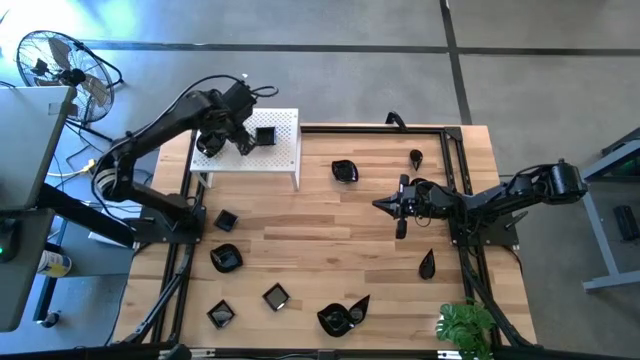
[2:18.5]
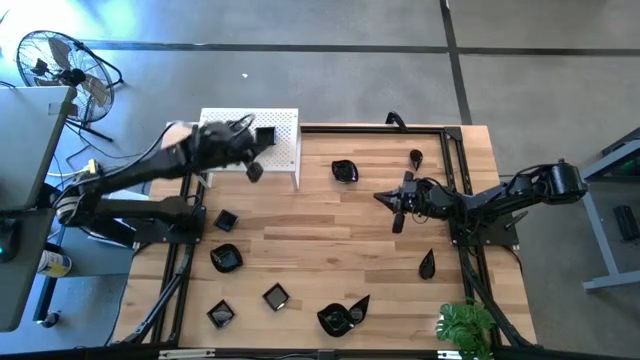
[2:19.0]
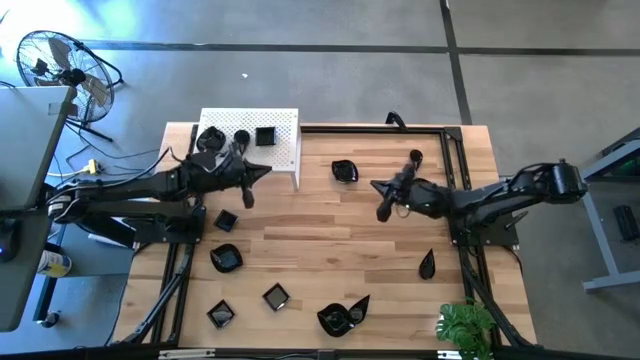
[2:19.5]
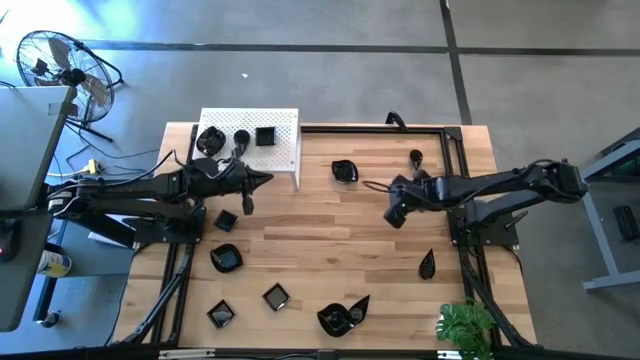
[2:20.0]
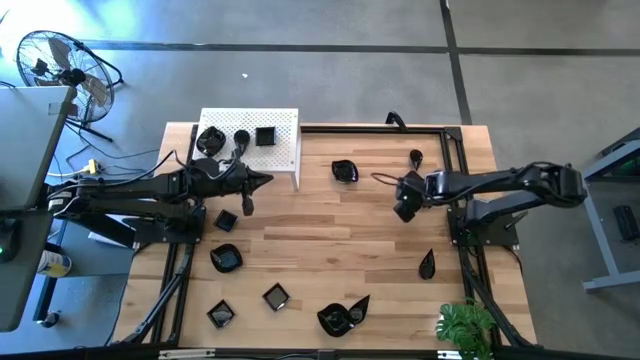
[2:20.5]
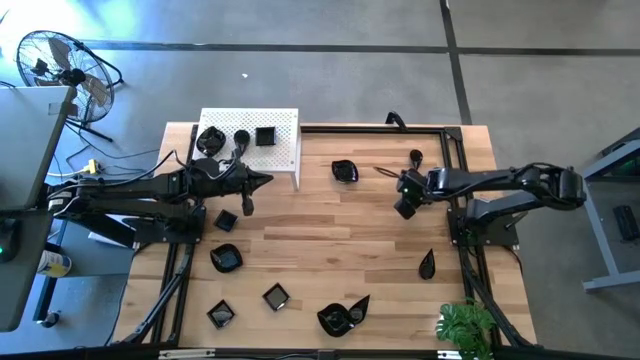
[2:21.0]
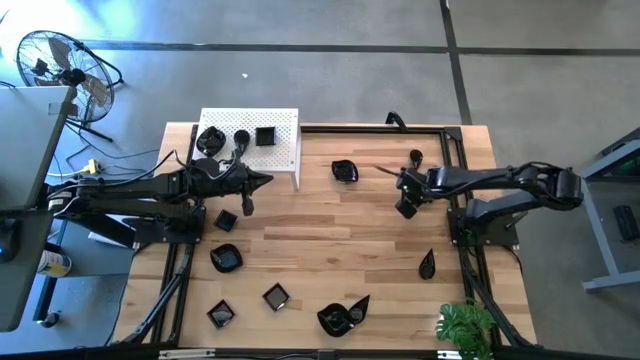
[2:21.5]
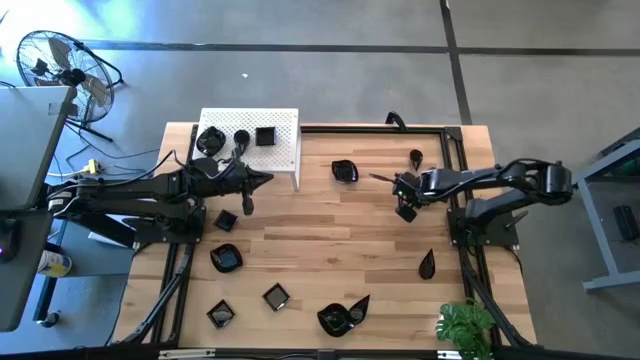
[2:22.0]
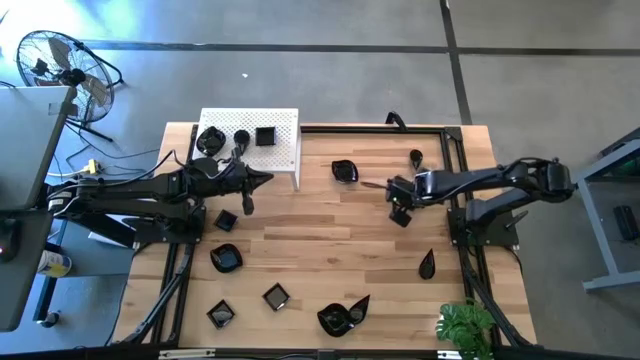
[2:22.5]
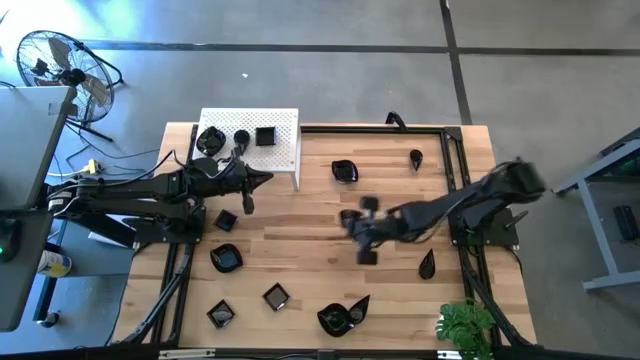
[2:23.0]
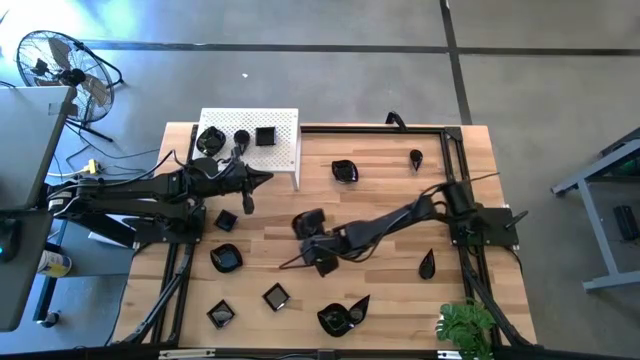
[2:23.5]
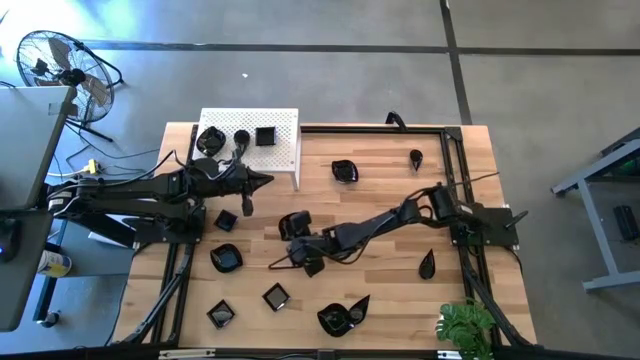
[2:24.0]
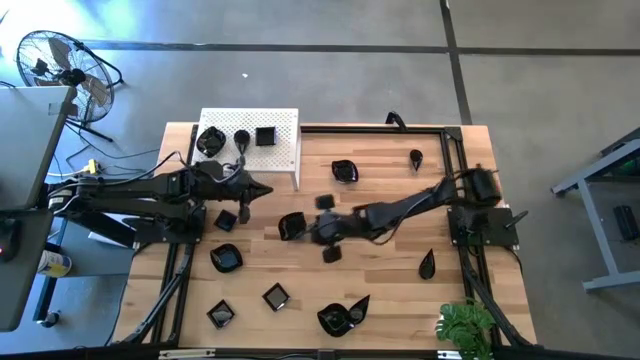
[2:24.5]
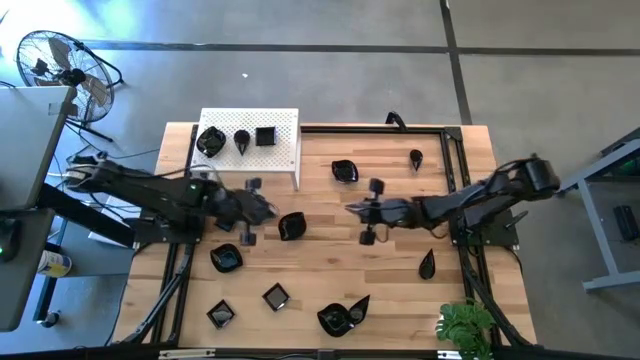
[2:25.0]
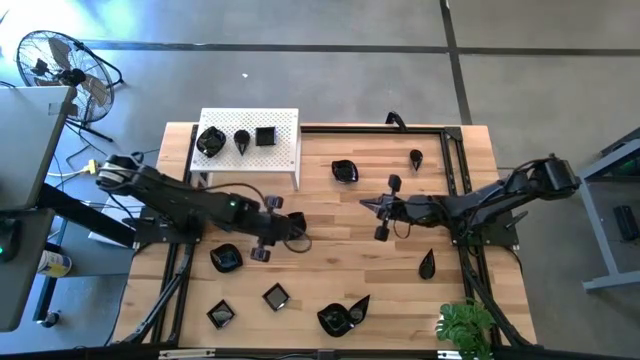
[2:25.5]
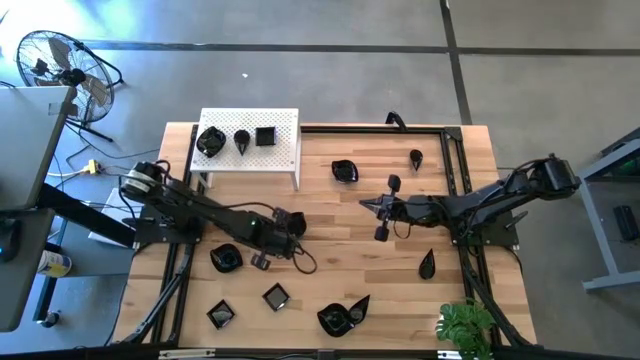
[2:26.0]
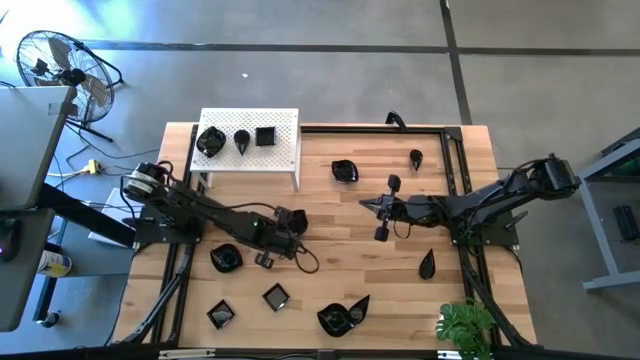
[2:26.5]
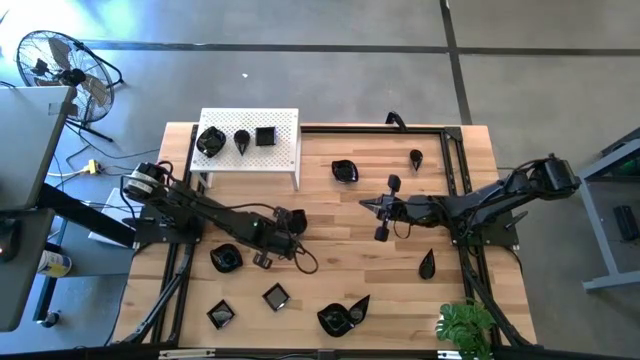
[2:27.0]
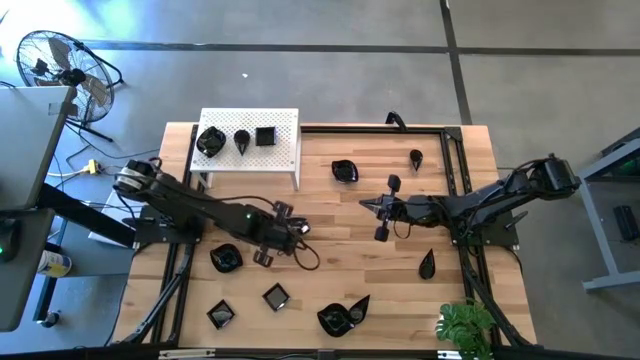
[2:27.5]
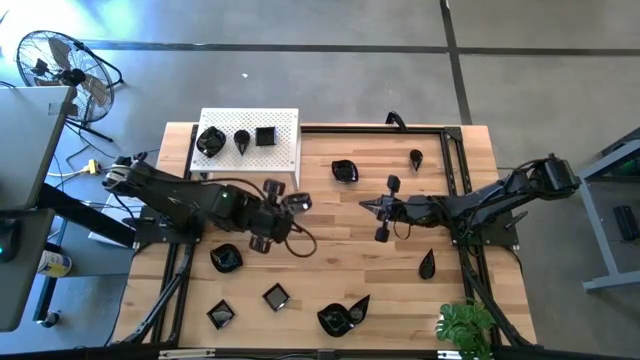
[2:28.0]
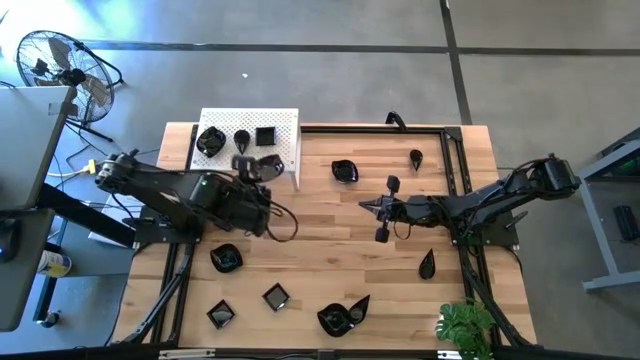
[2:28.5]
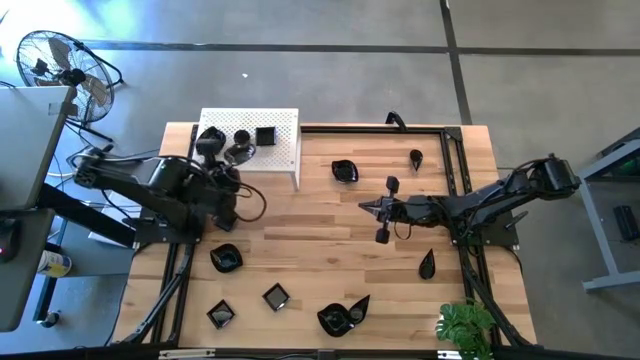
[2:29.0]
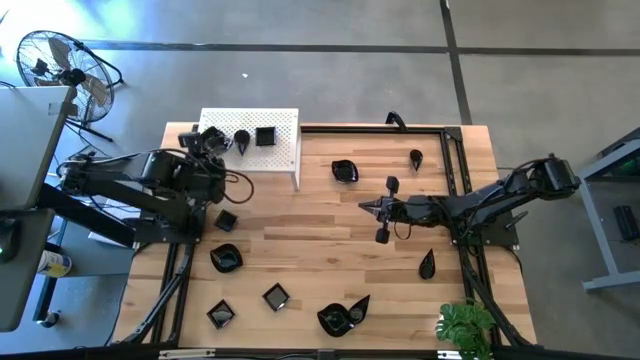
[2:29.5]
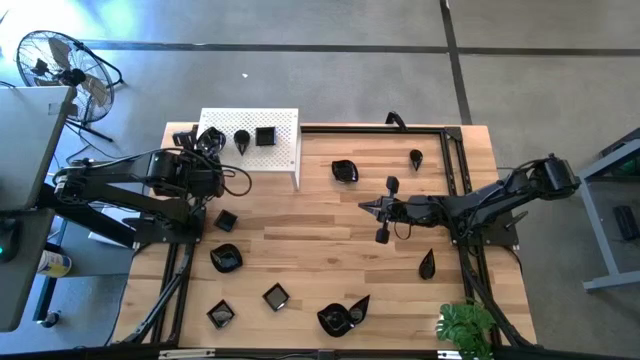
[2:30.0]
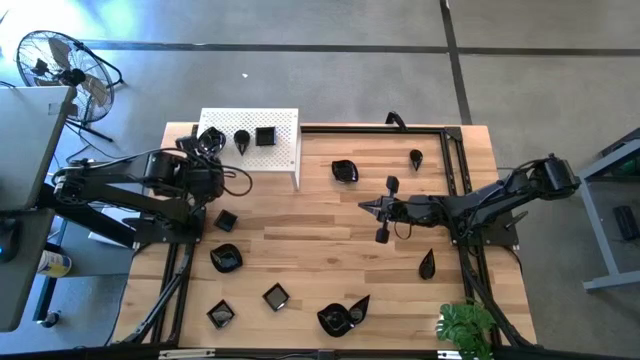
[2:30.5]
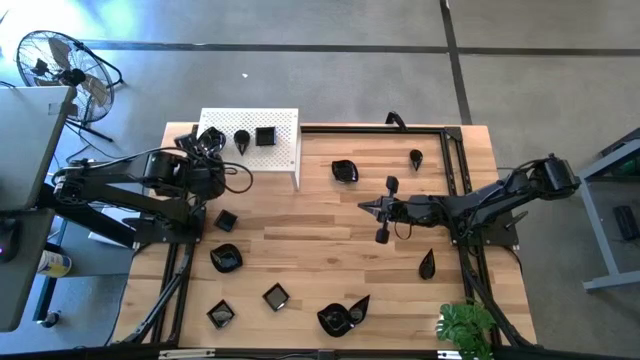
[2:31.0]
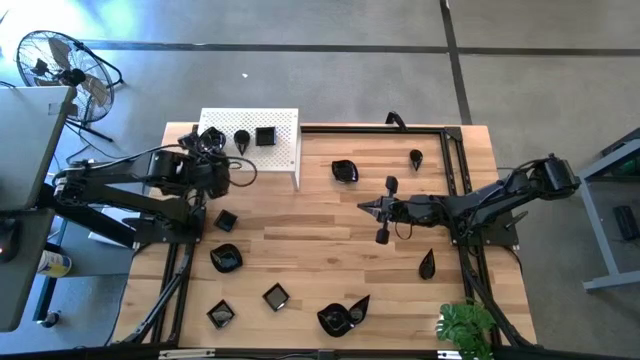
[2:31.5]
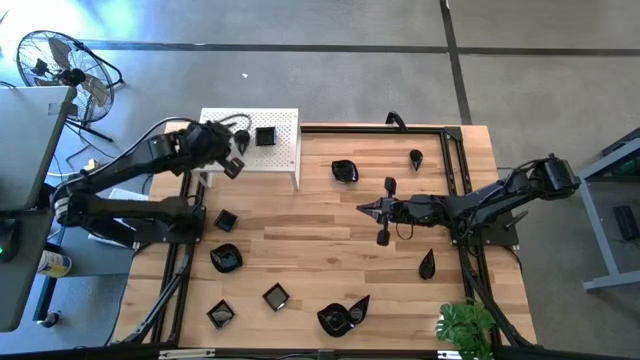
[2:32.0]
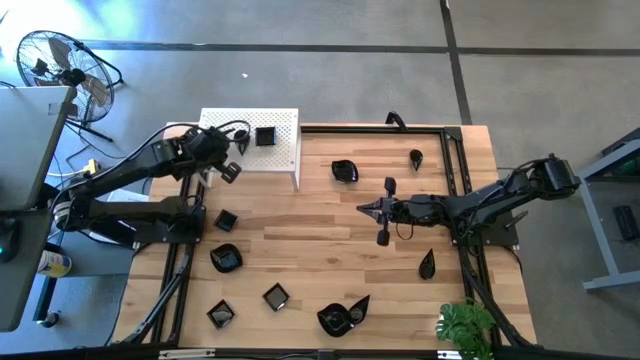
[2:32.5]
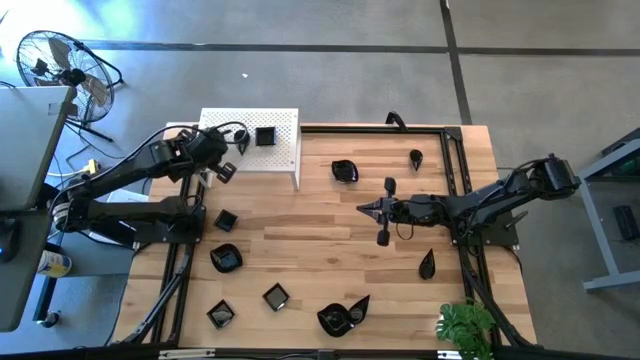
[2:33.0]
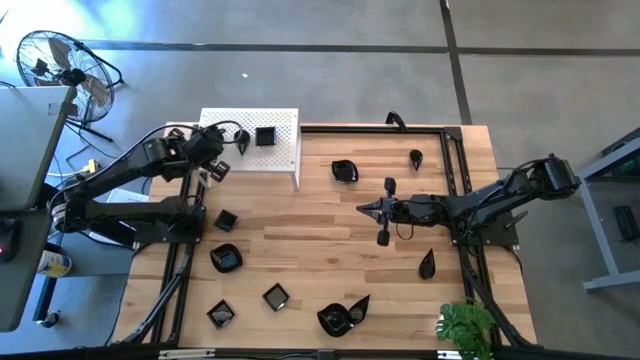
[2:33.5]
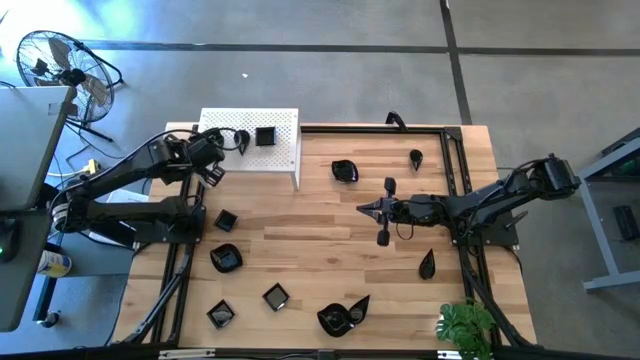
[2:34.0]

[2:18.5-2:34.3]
Task: Pick & Place Mini shaped plates
Stack the black leaf shaped plate on top of the stacked black leaf shaped plates on the shelf

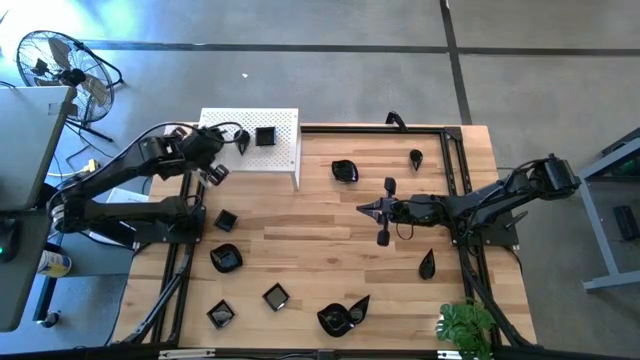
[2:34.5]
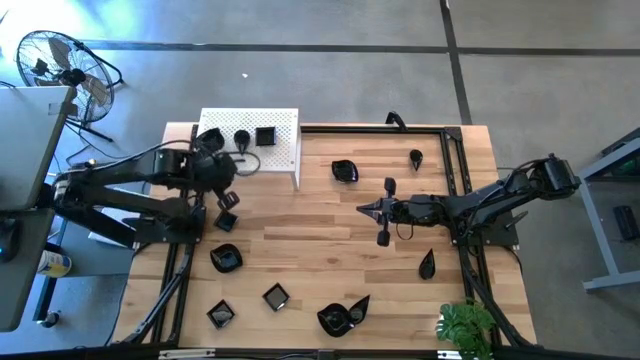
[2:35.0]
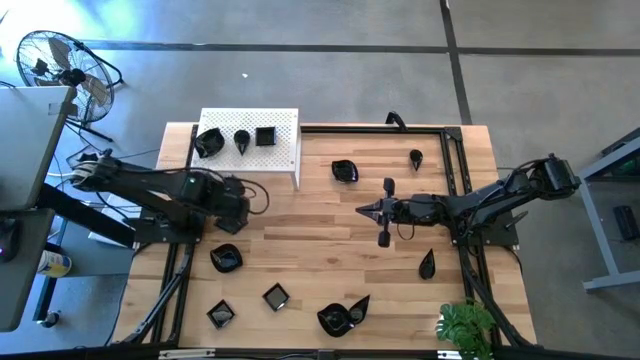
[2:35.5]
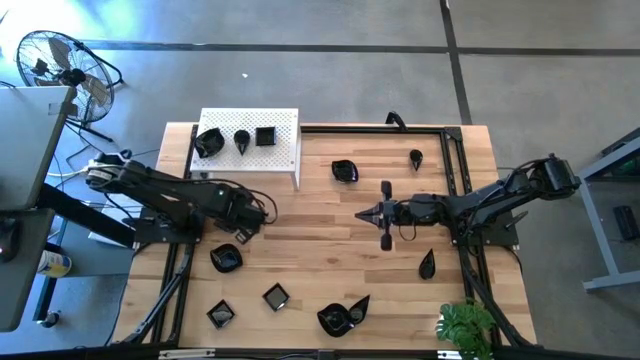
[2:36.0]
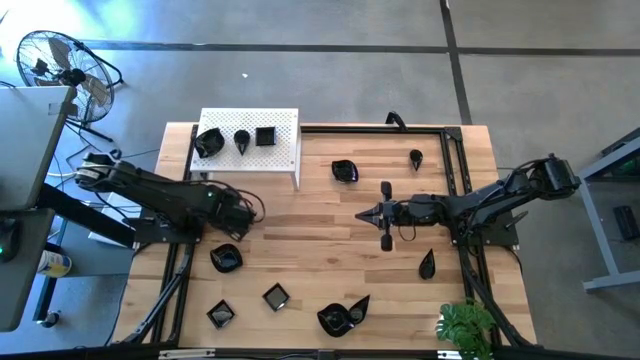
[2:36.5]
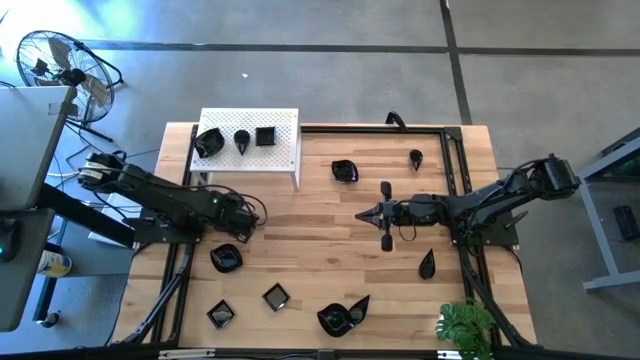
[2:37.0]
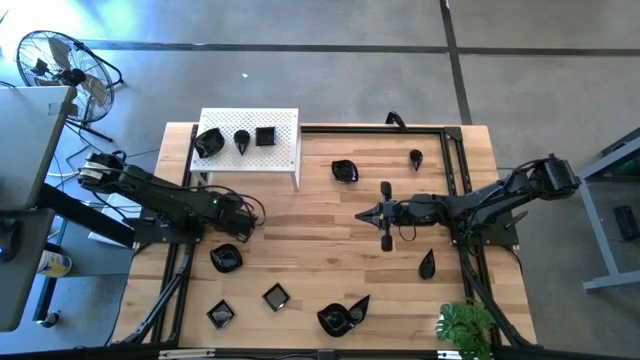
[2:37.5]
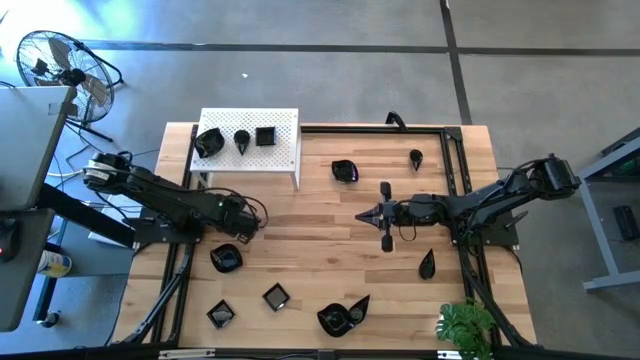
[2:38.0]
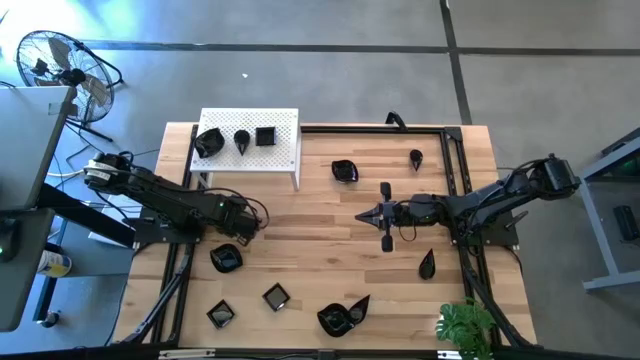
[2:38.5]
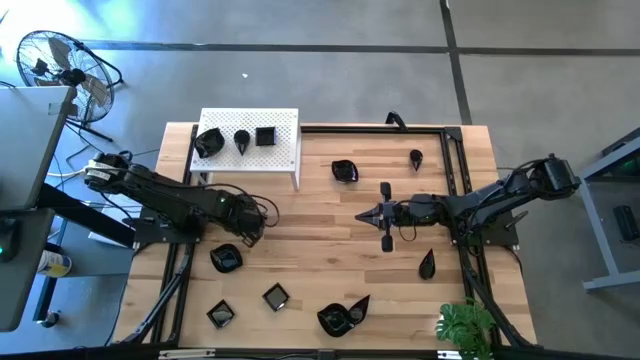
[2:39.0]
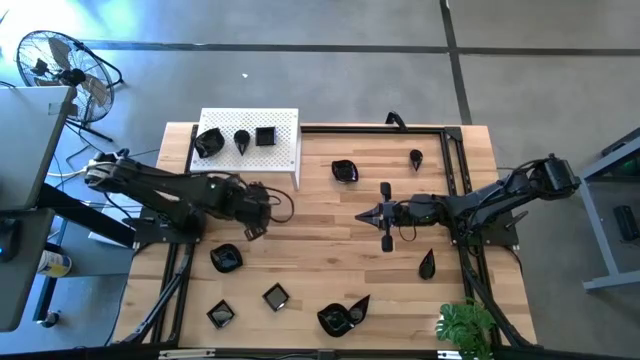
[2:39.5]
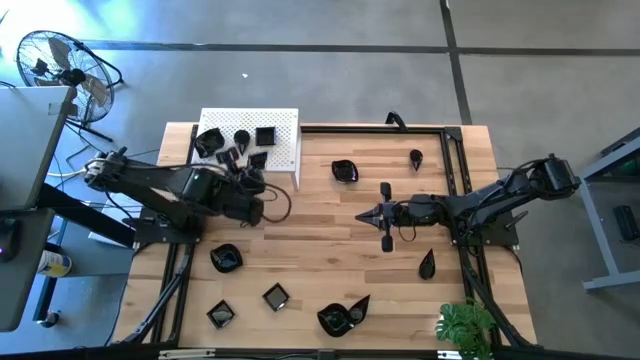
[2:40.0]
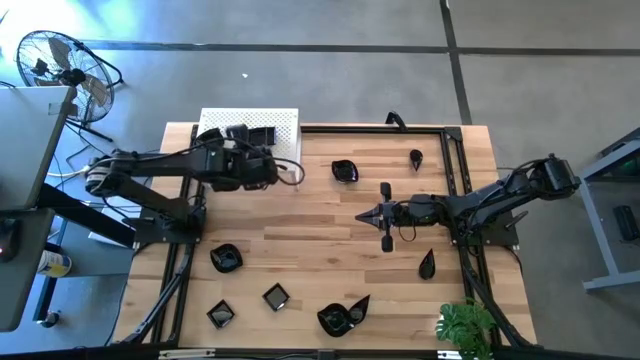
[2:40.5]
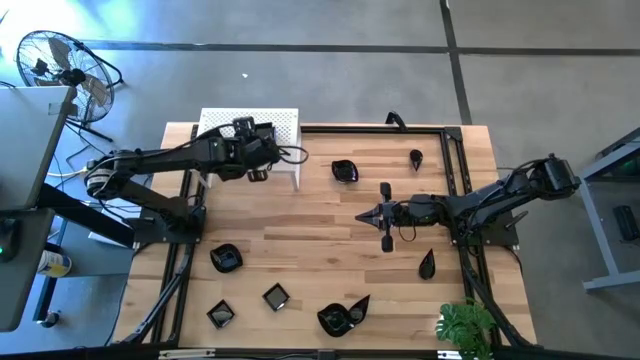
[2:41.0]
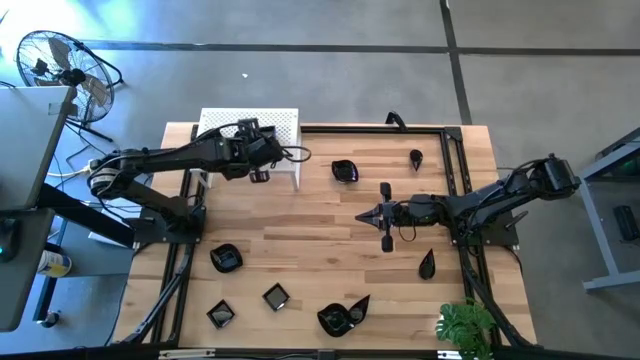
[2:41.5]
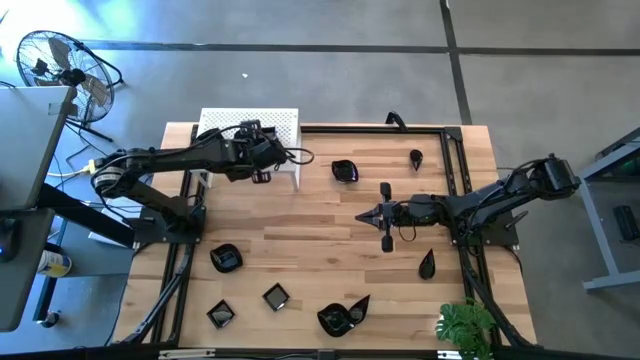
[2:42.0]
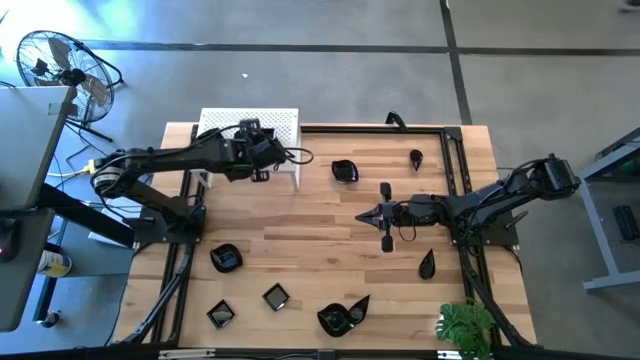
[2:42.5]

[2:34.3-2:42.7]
Stack the top black square plate on top of the stacked black square plates on the shelf
